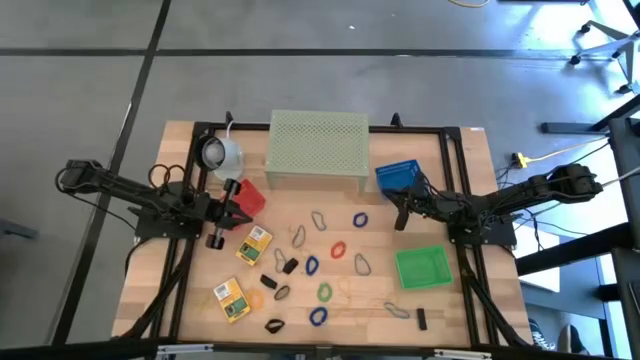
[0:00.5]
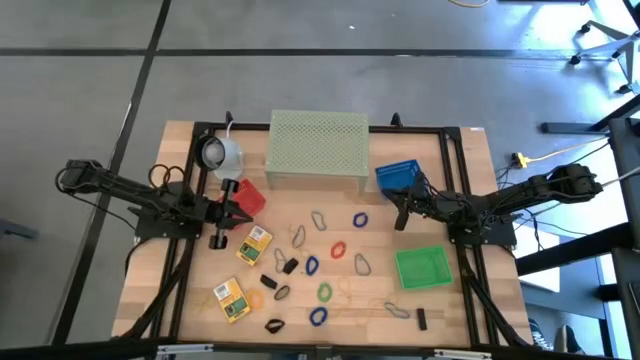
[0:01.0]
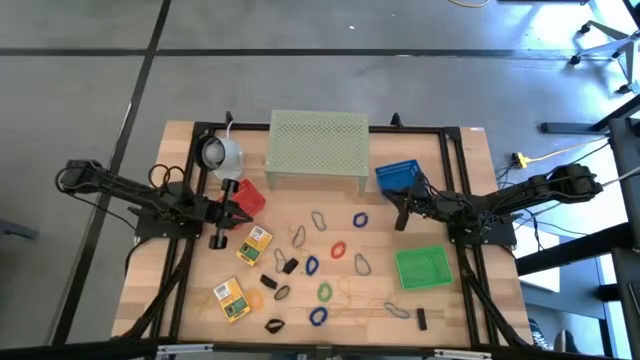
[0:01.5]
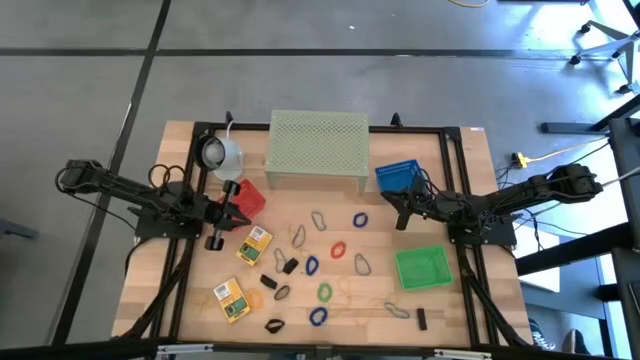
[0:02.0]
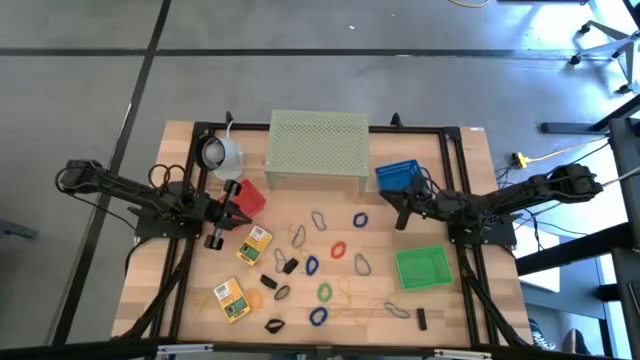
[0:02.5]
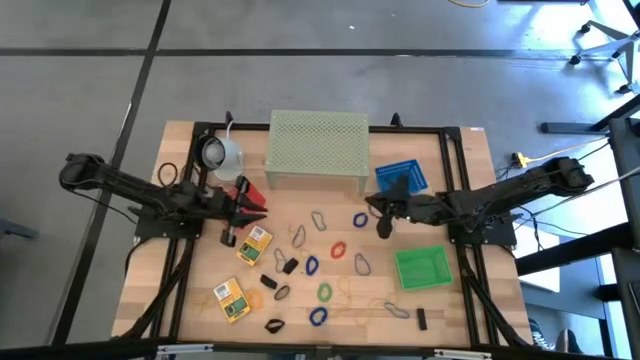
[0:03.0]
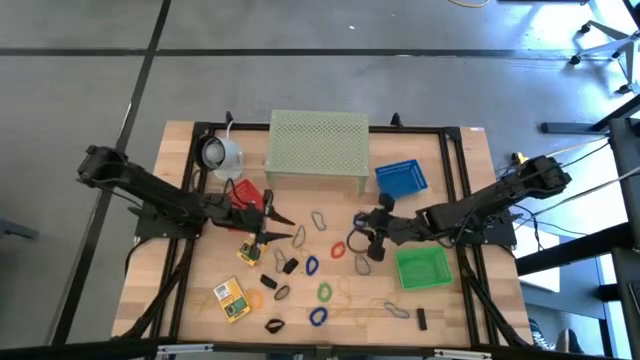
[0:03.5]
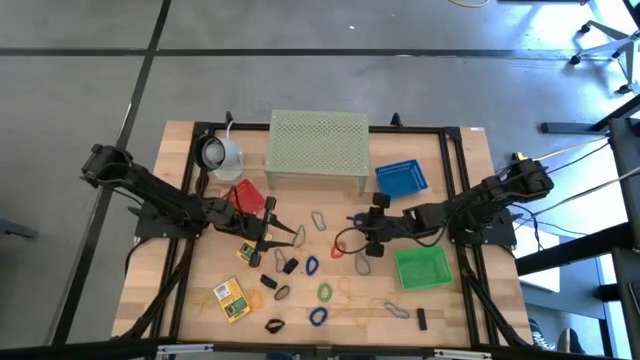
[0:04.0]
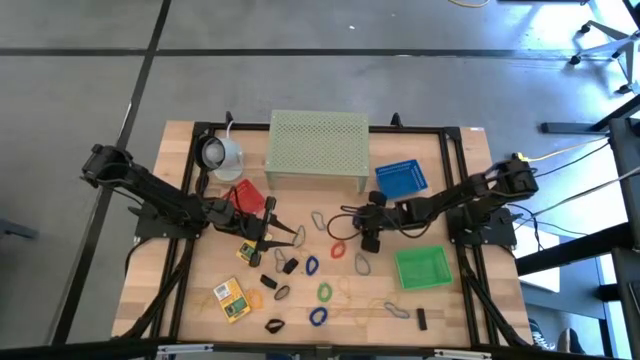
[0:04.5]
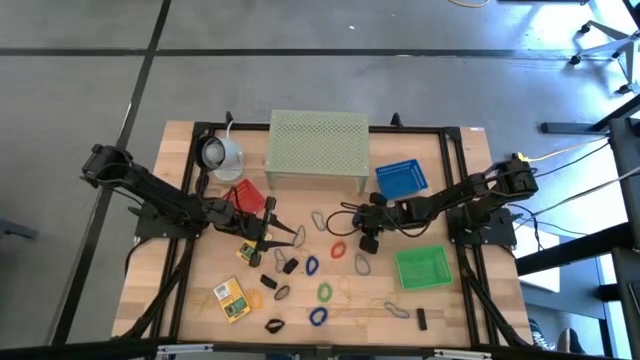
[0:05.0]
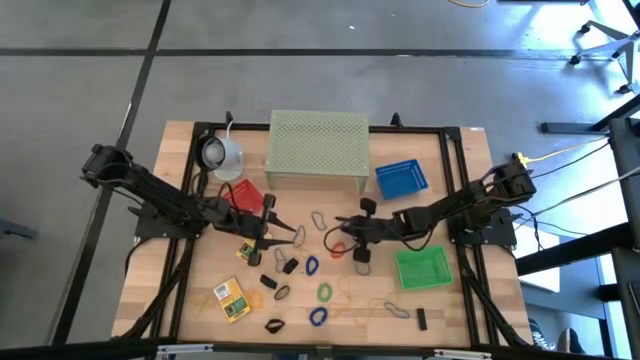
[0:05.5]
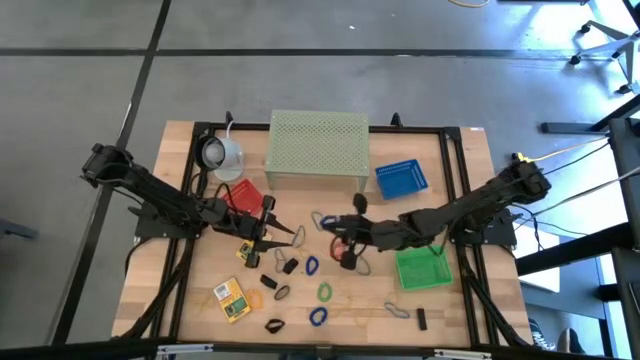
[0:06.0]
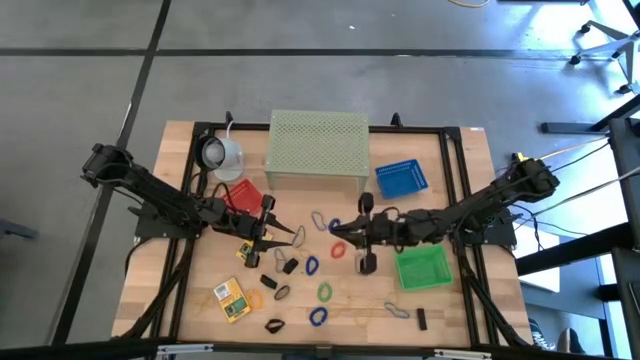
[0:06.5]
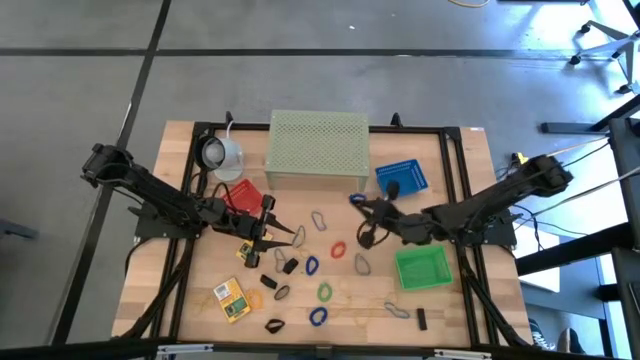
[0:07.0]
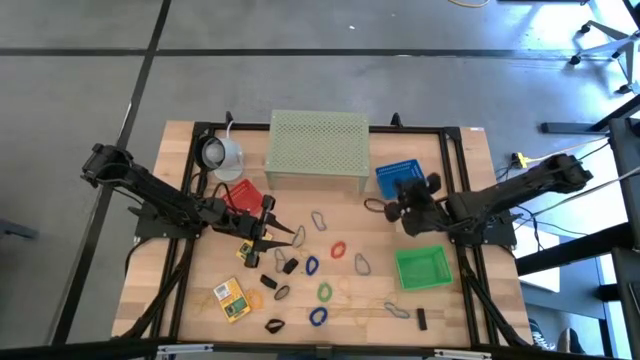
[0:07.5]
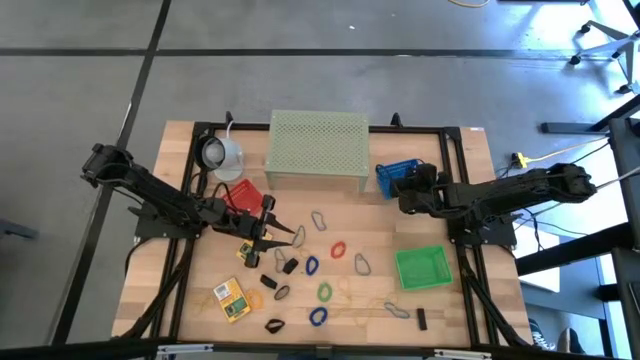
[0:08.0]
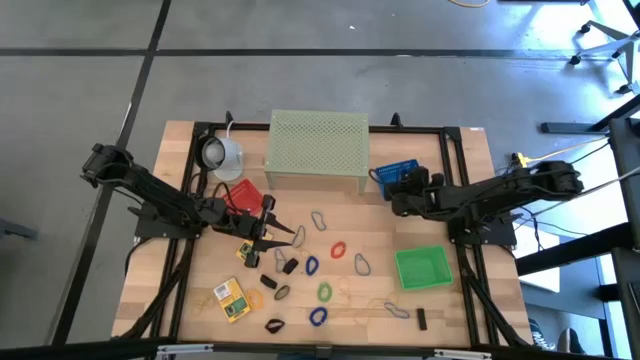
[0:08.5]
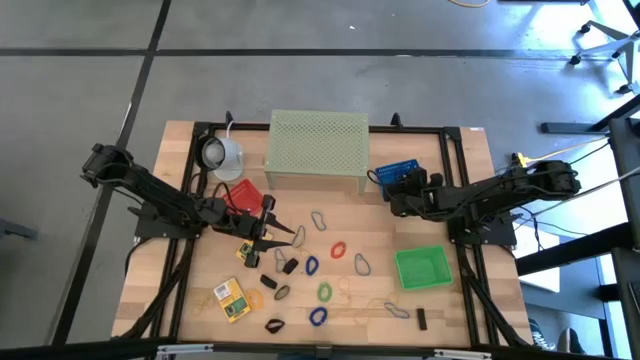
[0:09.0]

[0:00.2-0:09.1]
Task: Pick & Place Office Desk Supplies
Put the blue spring keychain into the blue bin

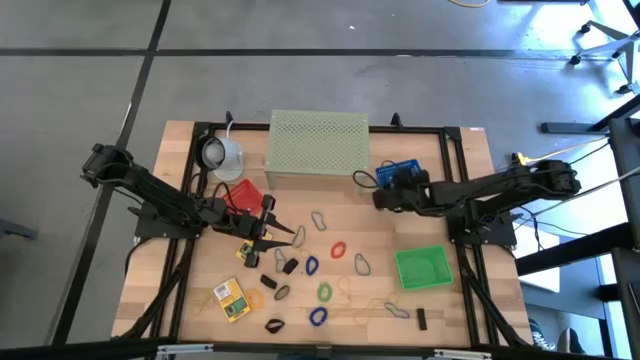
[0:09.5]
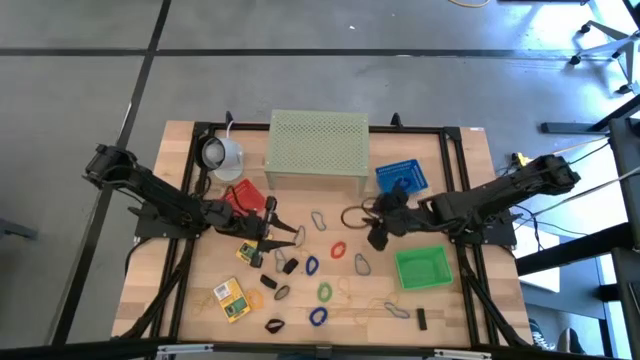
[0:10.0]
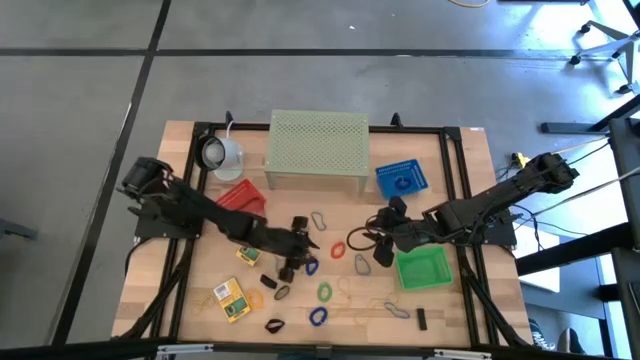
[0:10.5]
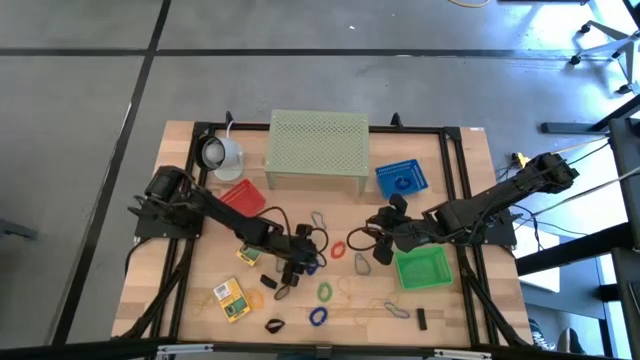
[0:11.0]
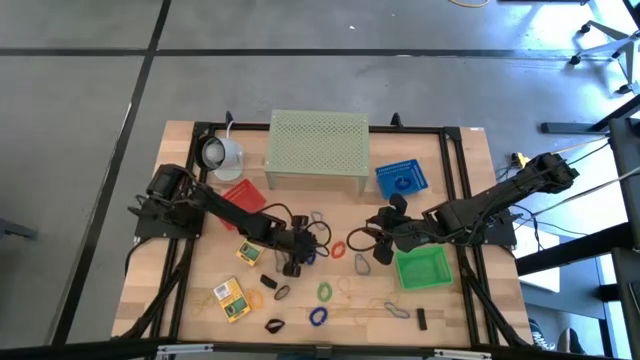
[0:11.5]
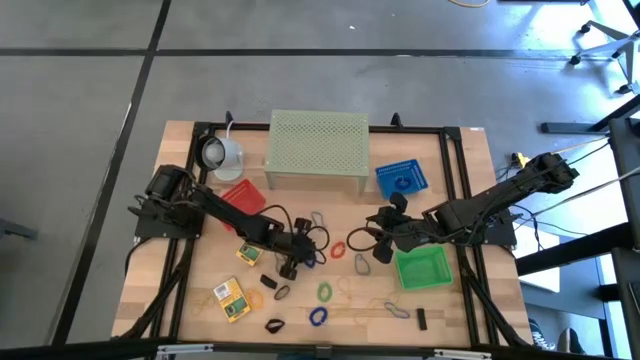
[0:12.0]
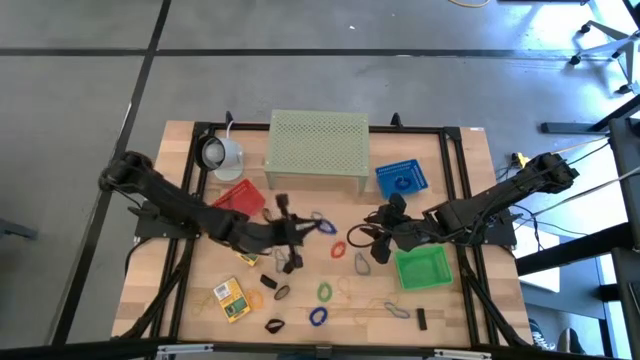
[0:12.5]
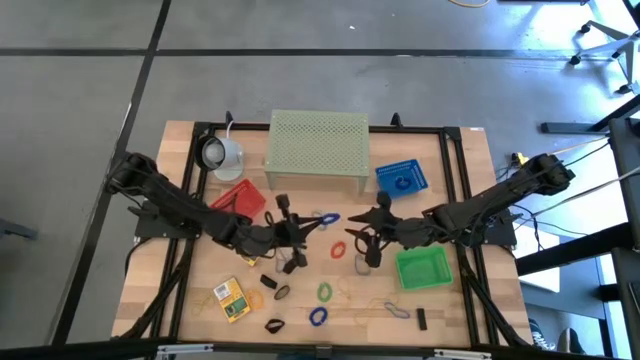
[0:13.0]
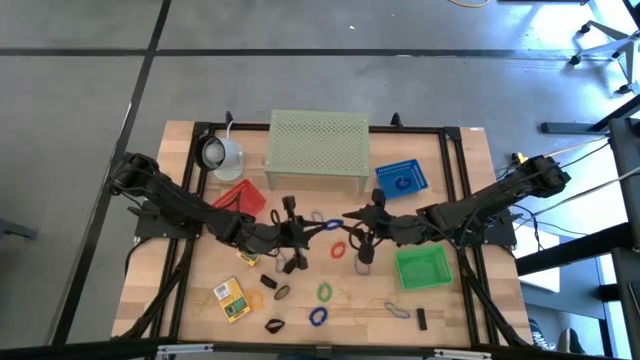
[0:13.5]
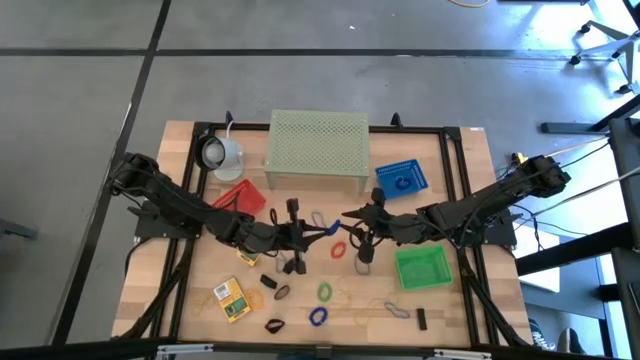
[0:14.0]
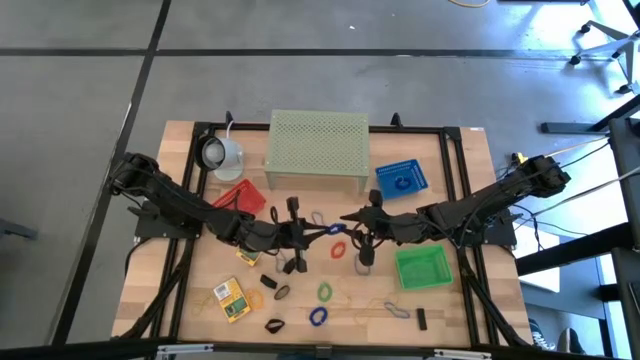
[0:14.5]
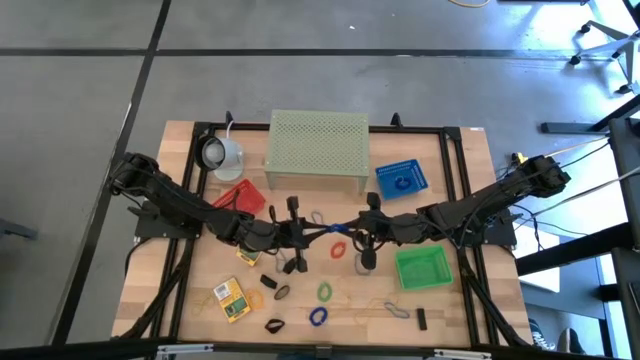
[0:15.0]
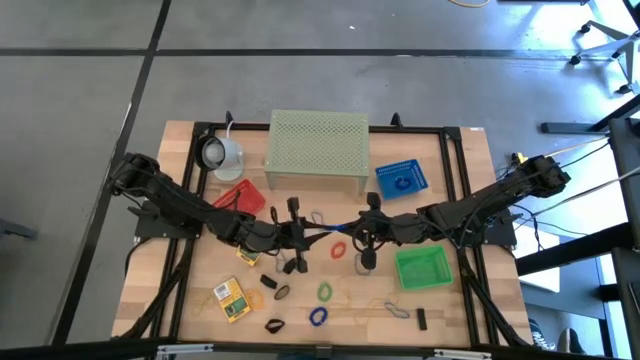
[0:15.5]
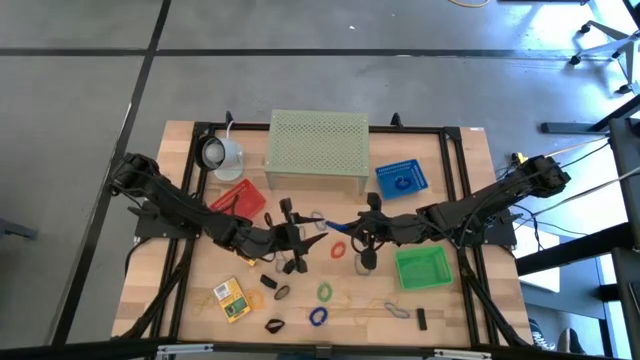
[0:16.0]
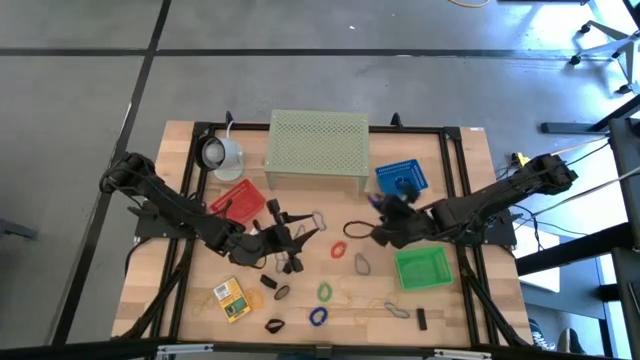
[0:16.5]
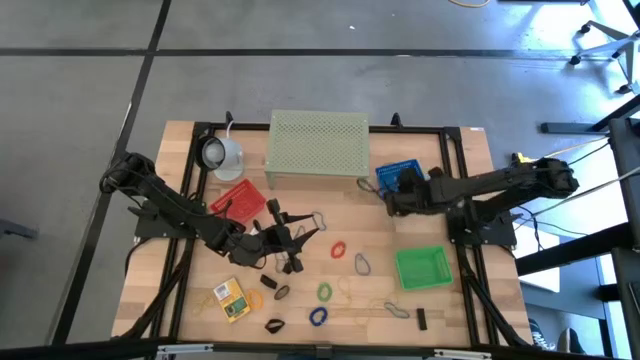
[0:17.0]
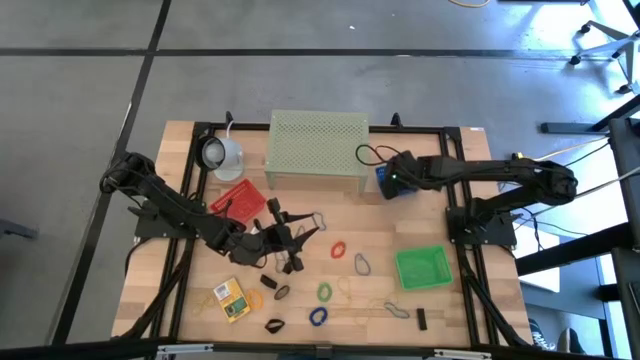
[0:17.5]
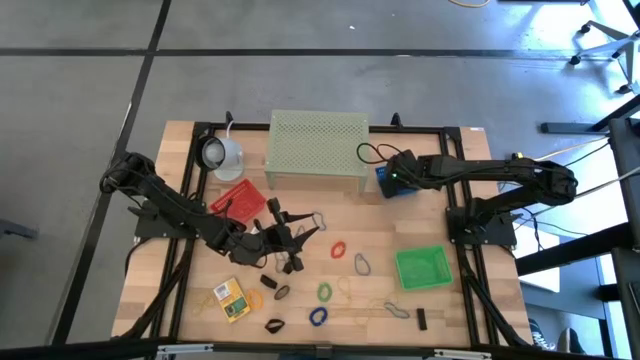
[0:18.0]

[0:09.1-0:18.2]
Put the blue spring keychain into the blue bin

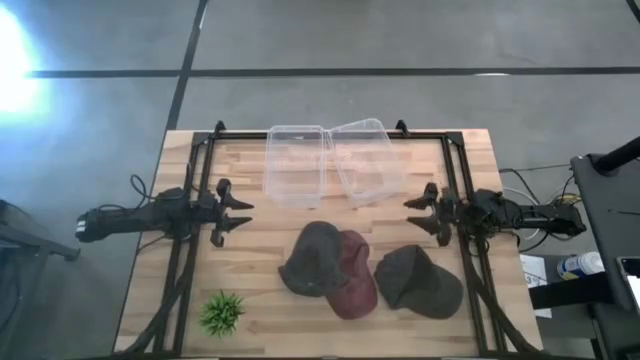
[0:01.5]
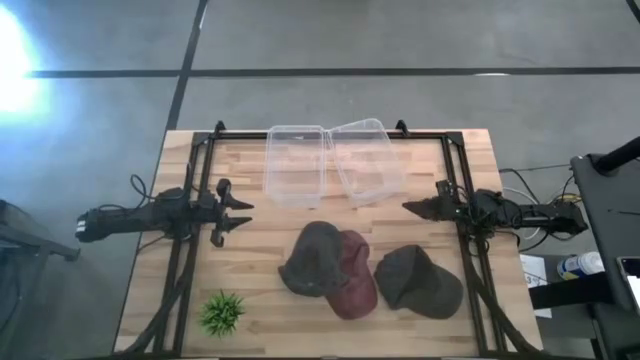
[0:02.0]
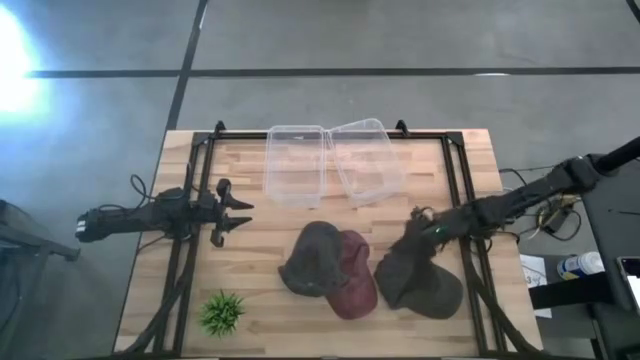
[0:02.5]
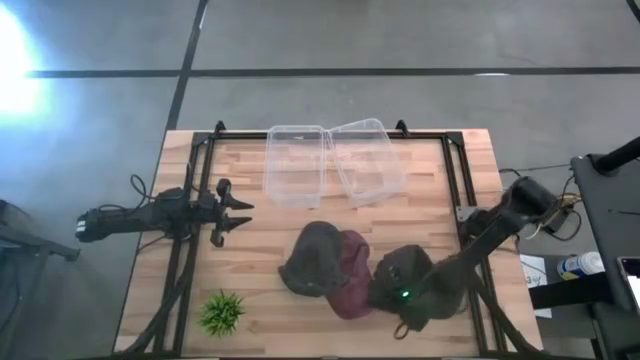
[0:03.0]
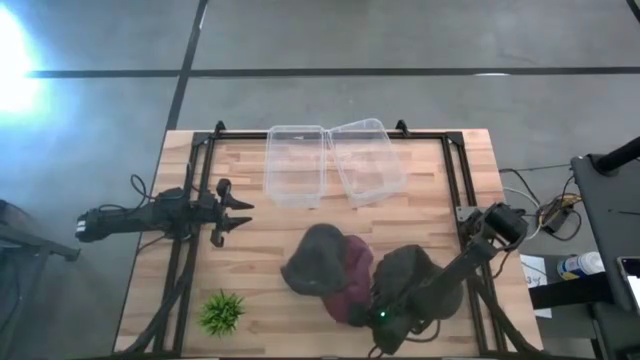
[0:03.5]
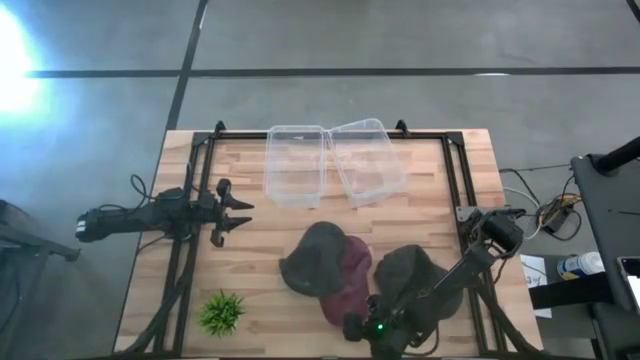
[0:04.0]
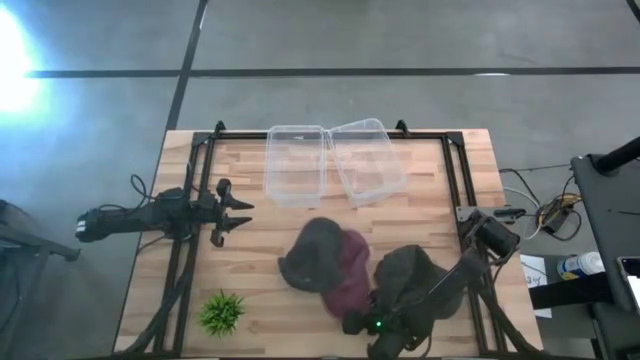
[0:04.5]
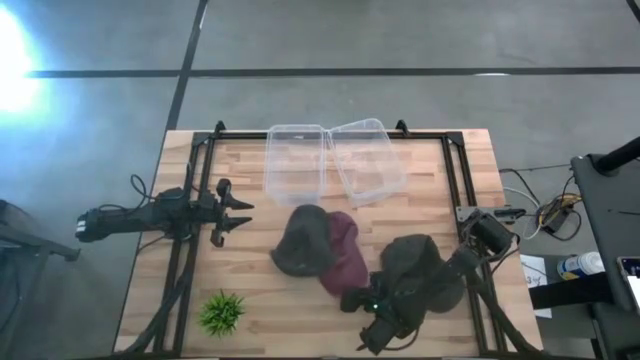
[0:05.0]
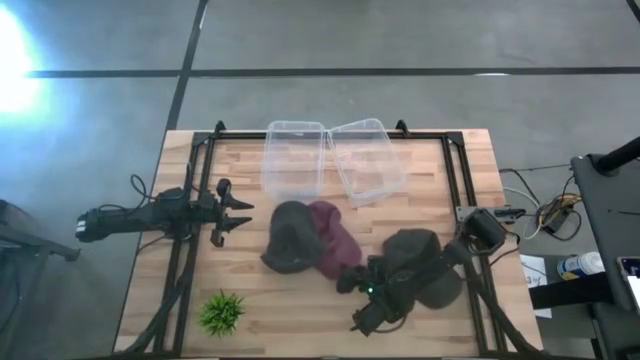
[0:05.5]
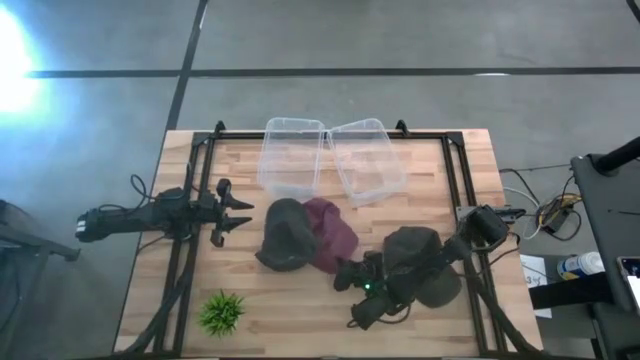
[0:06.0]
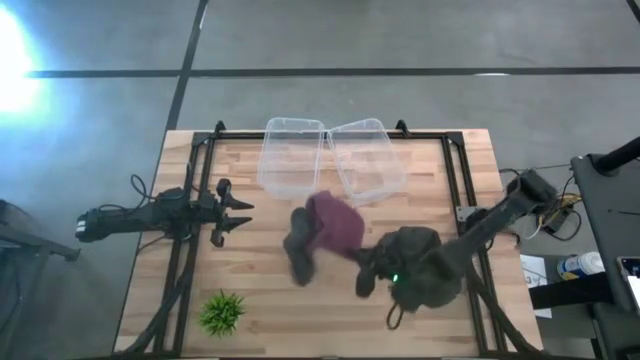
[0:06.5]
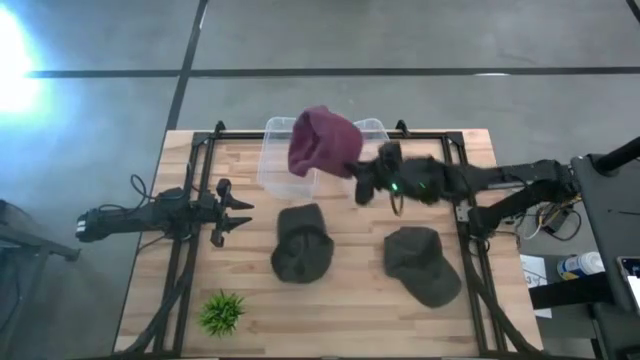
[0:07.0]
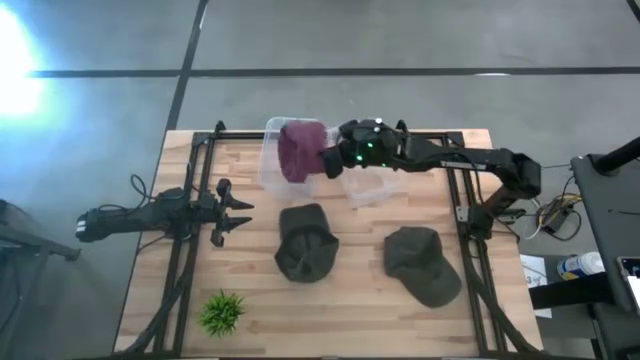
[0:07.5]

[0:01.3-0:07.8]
Task: Pick & Place hat
Put the red cap into the left transparent bin
